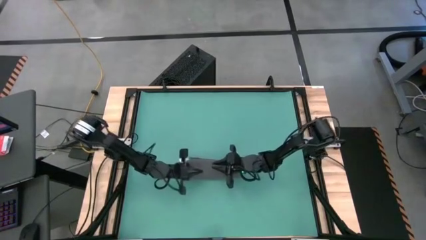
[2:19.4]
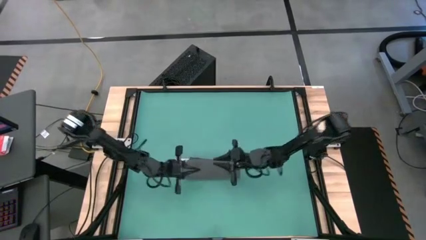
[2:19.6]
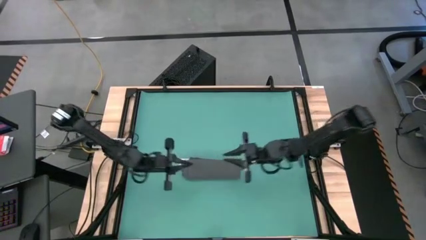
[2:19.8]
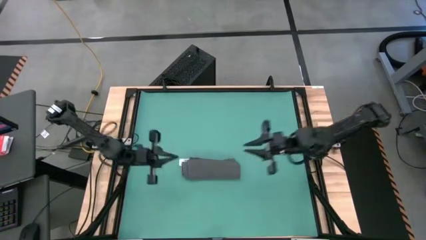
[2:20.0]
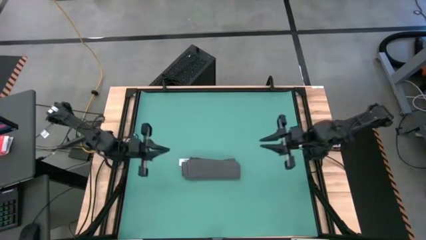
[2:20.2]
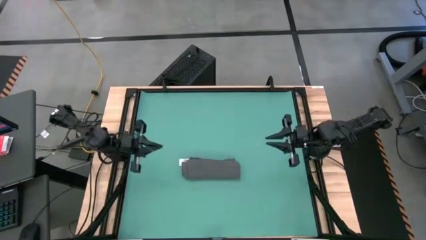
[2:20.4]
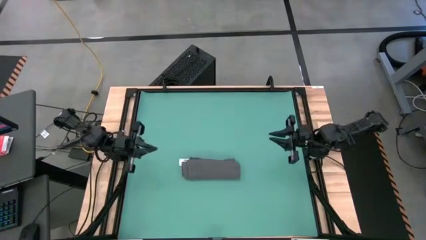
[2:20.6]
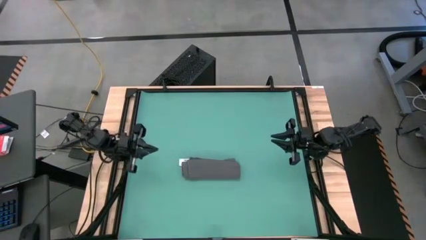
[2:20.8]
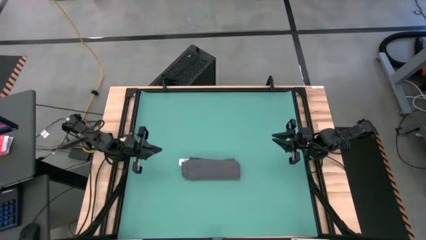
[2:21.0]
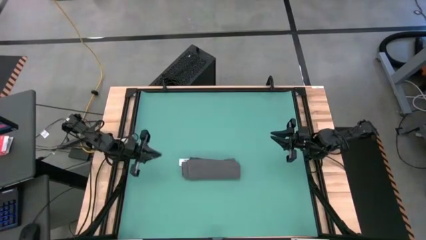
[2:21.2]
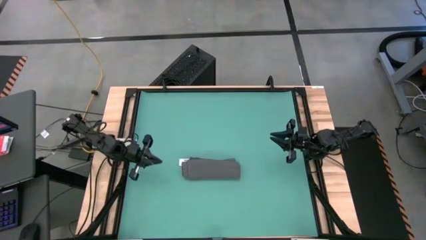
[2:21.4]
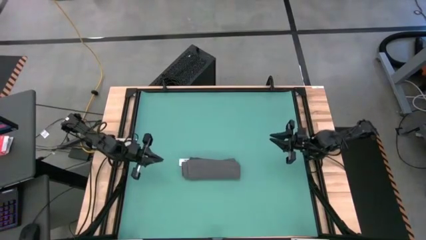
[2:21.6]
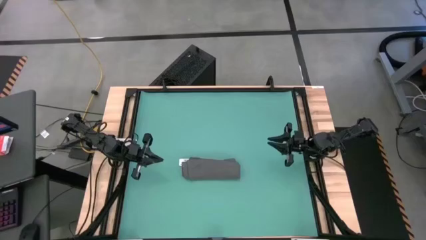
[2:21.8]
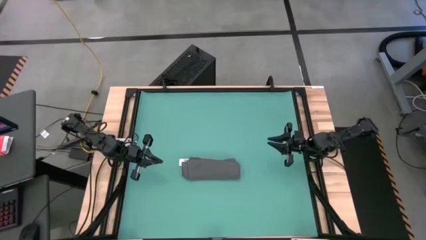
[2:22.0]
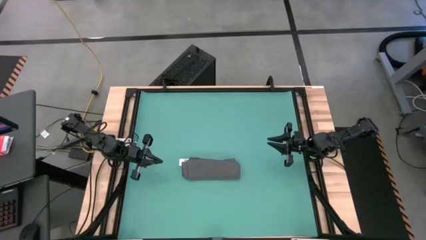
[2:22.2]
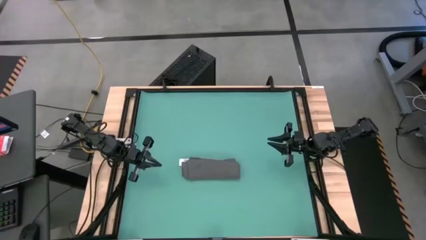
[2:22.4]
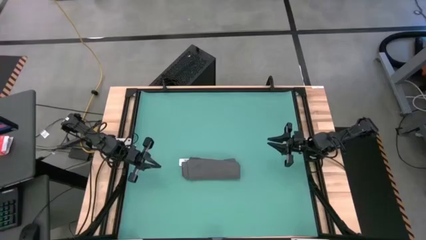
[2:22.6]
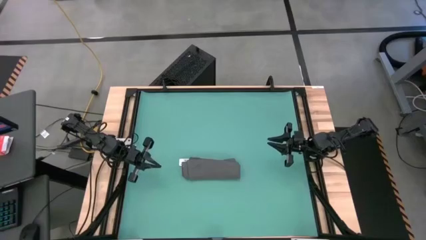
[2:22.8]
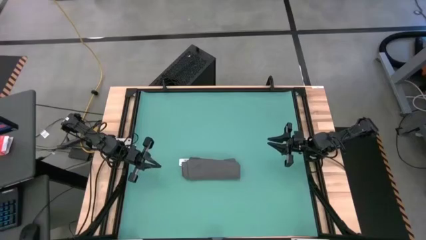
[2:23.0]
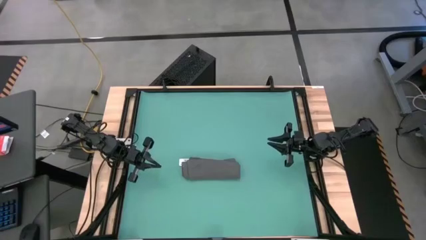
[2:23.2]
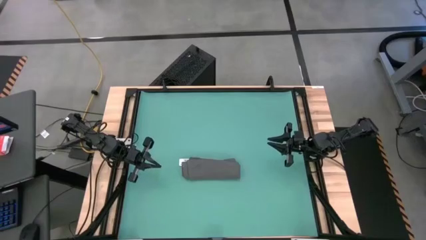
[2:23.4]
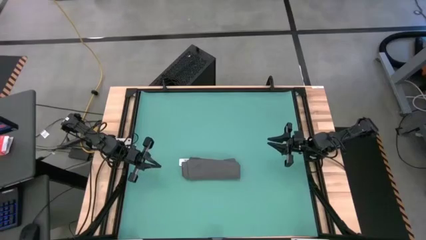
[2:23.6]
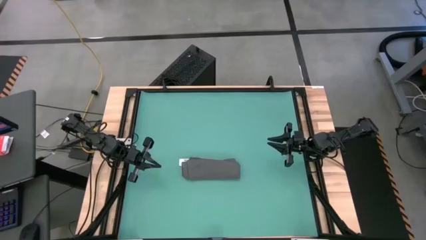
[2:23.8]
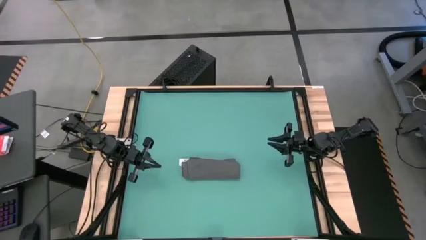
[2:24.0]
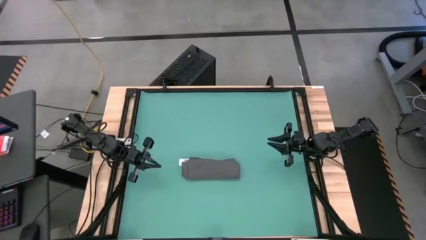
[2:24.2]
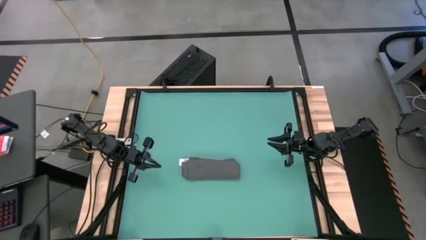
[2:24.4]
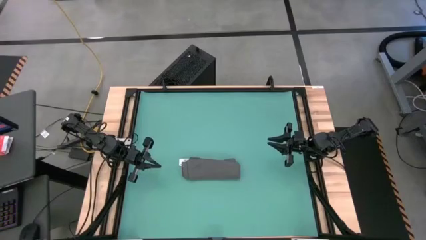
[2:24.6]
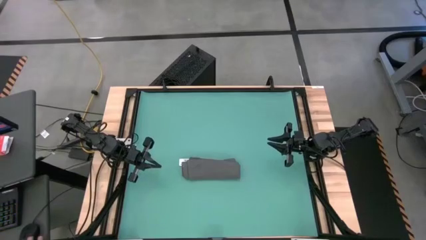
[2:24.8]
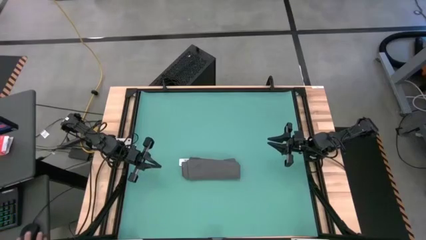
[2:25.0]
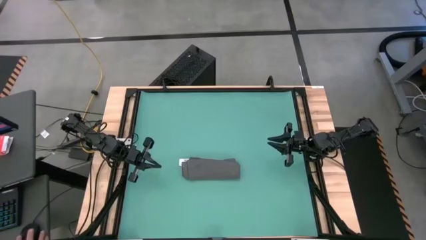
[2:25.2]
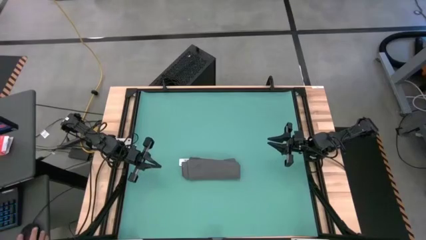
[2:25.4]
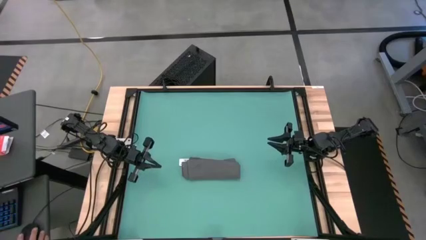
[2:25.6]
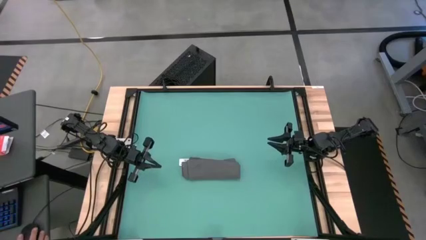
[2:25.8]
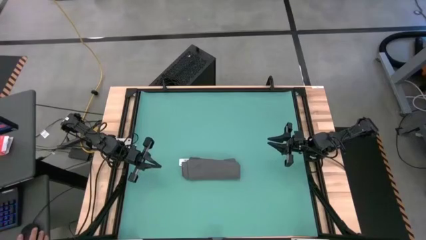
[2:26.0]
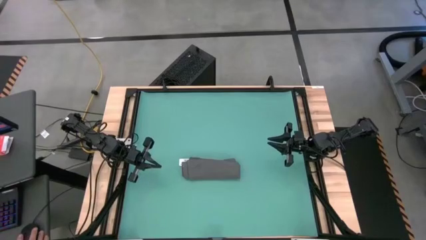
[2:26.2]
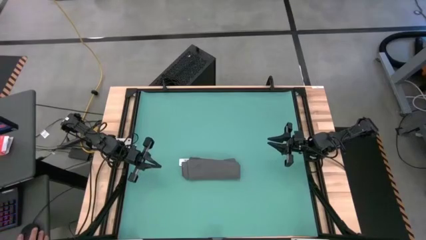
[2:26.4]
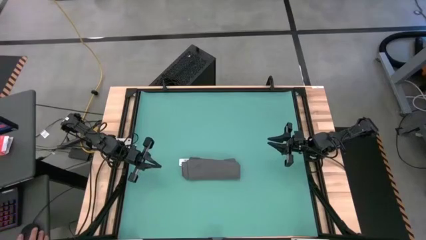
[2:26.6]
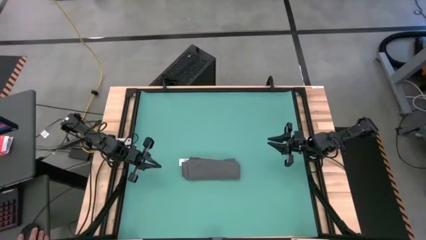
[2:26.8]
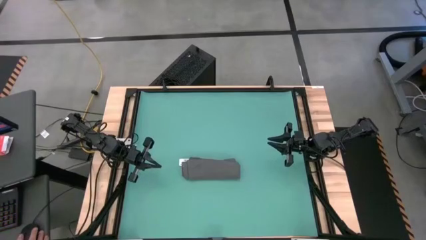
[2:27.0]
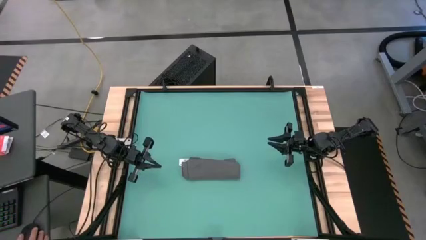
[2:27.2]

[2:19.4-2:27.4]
Task: Roll towel
Return to Home Position

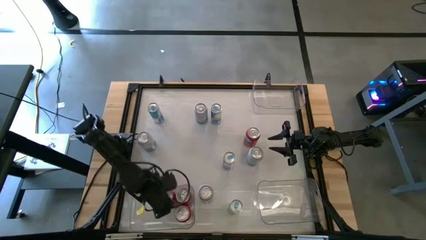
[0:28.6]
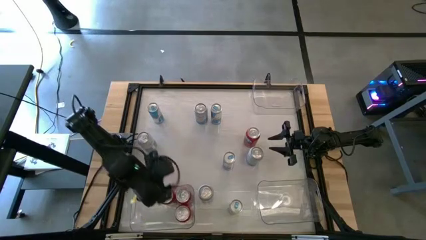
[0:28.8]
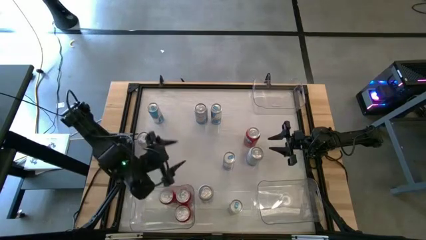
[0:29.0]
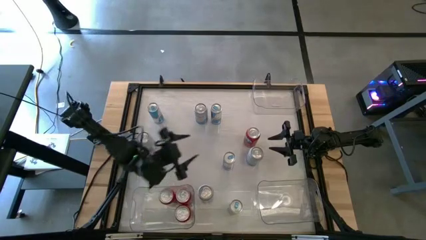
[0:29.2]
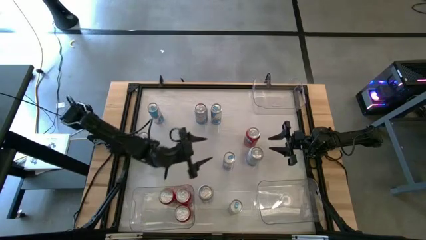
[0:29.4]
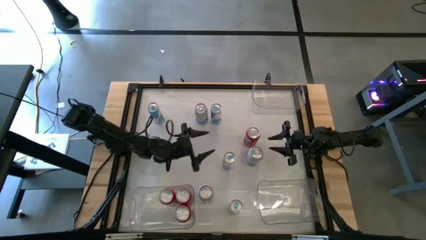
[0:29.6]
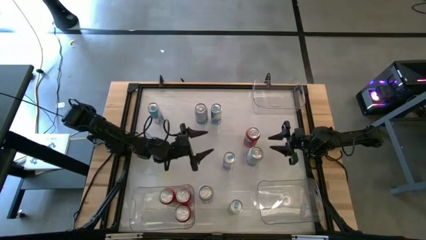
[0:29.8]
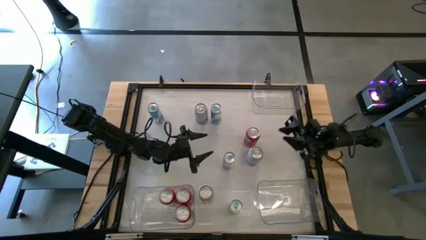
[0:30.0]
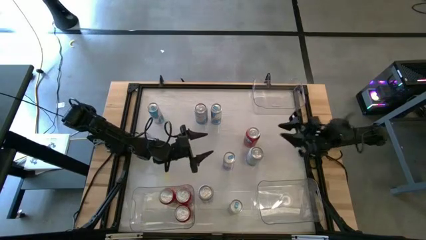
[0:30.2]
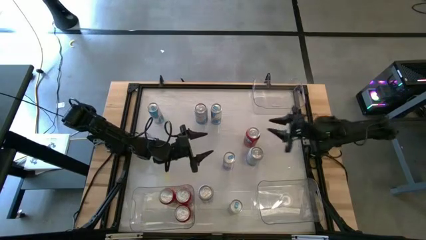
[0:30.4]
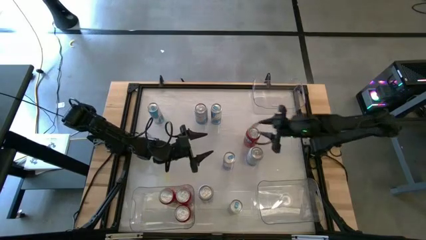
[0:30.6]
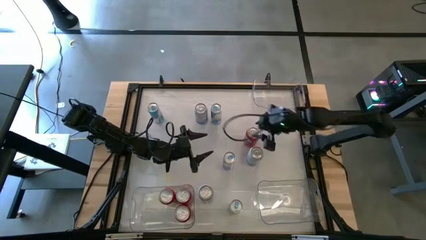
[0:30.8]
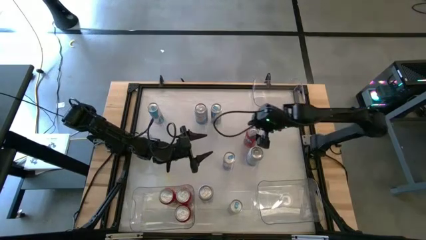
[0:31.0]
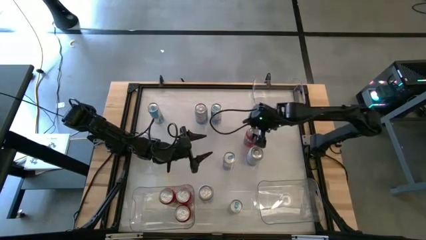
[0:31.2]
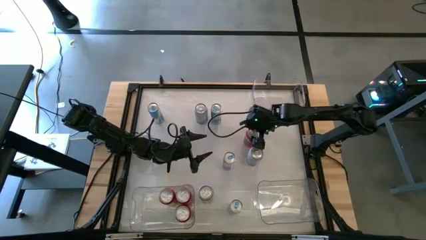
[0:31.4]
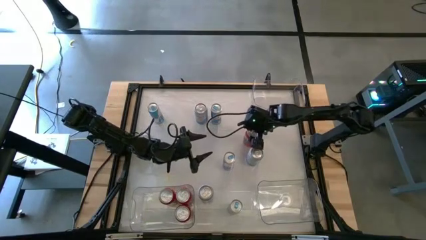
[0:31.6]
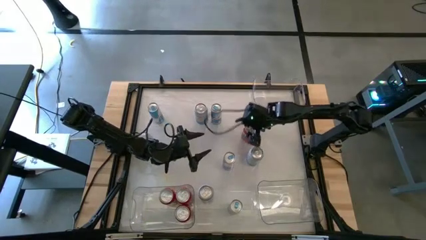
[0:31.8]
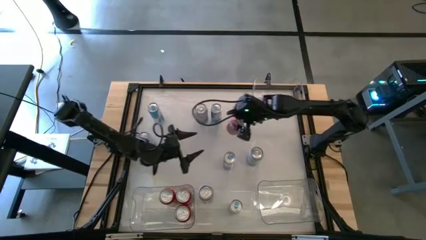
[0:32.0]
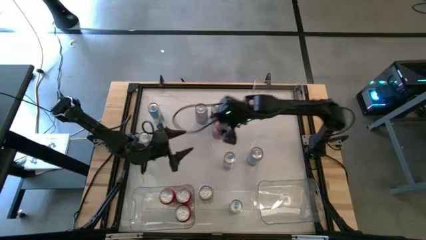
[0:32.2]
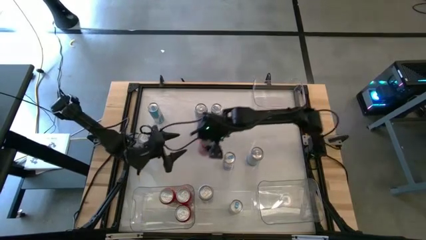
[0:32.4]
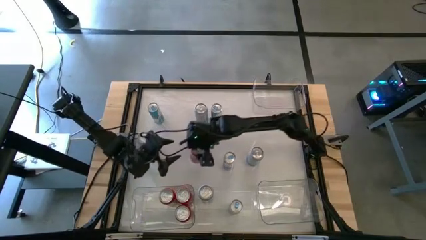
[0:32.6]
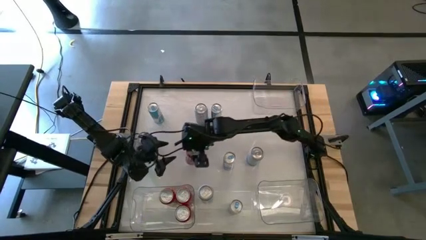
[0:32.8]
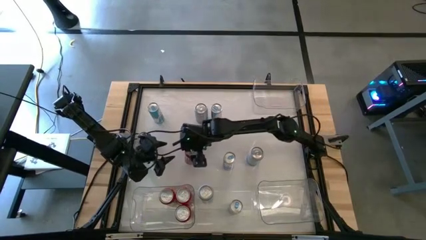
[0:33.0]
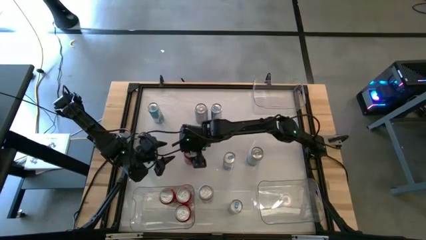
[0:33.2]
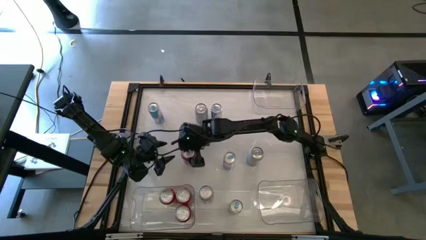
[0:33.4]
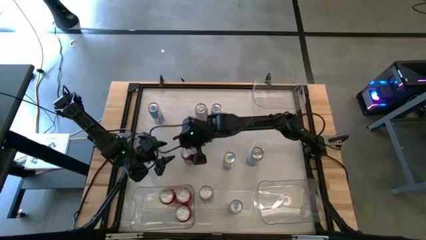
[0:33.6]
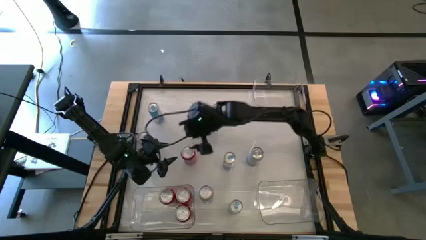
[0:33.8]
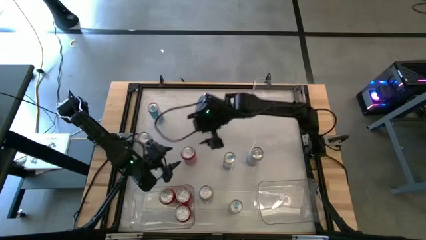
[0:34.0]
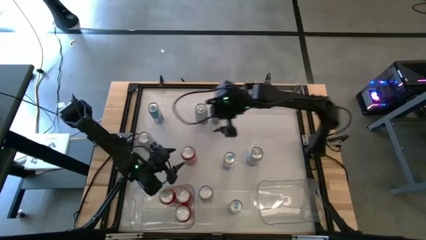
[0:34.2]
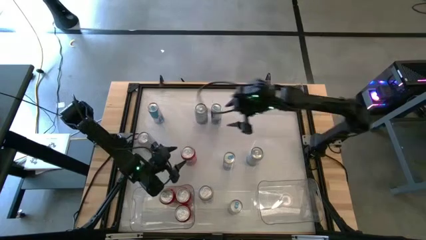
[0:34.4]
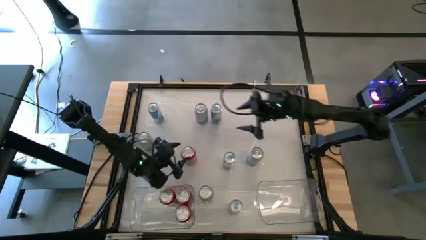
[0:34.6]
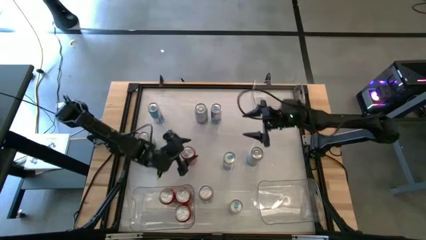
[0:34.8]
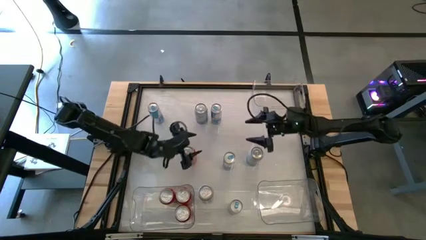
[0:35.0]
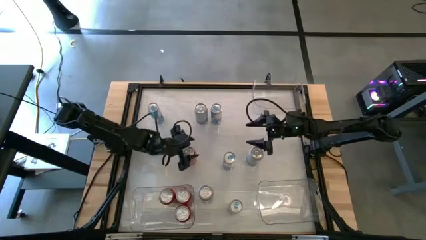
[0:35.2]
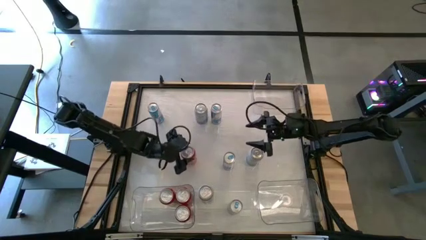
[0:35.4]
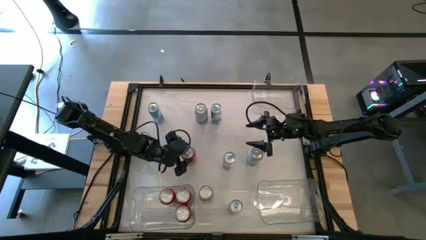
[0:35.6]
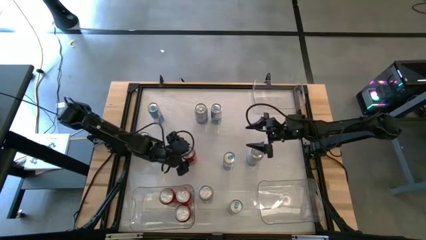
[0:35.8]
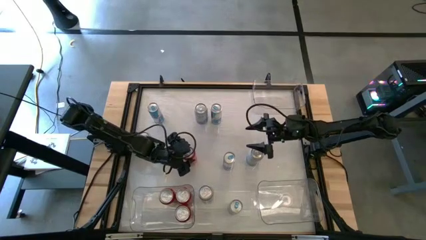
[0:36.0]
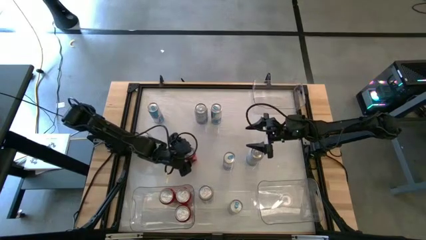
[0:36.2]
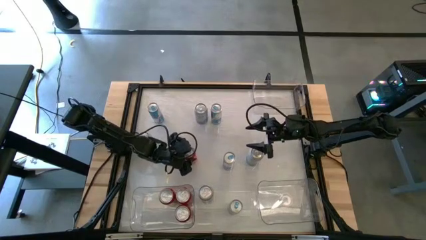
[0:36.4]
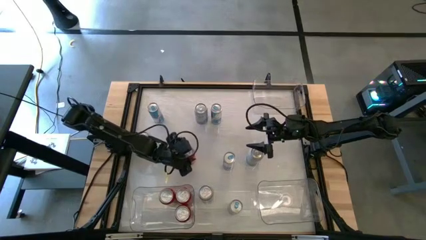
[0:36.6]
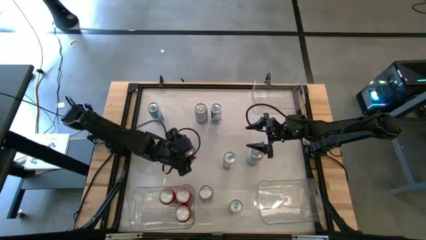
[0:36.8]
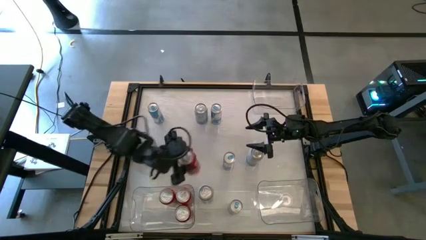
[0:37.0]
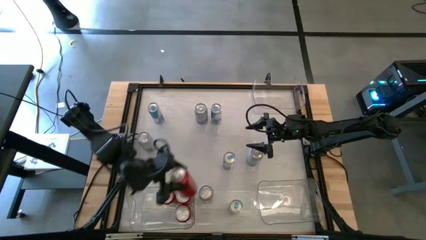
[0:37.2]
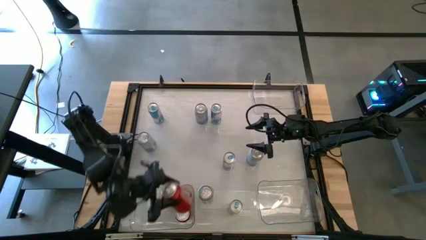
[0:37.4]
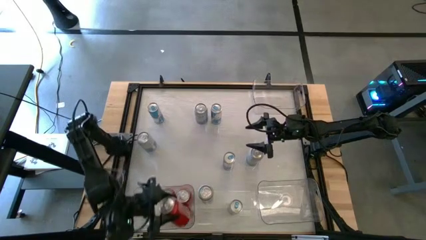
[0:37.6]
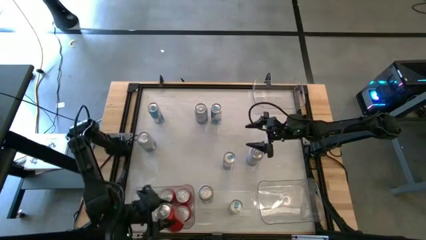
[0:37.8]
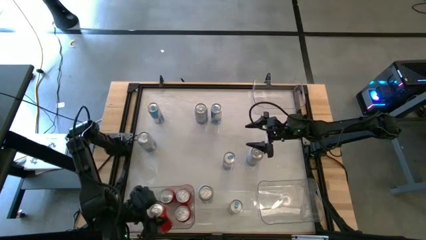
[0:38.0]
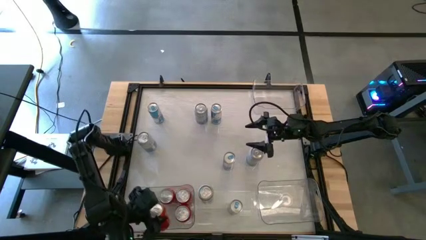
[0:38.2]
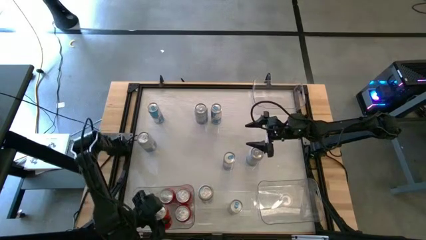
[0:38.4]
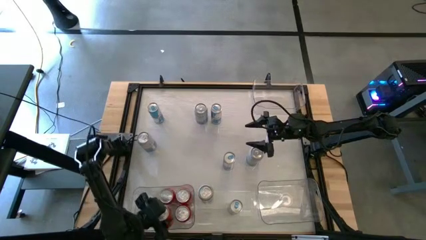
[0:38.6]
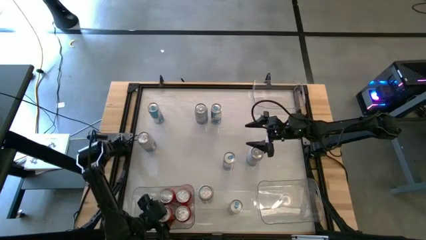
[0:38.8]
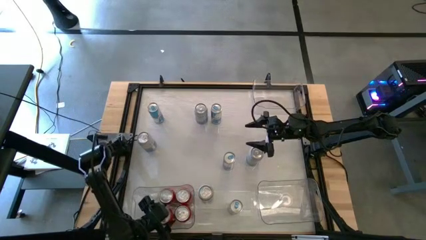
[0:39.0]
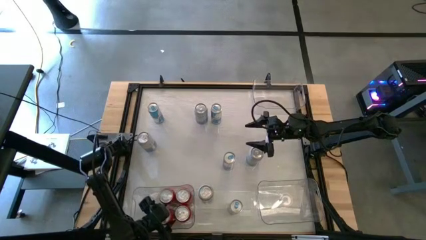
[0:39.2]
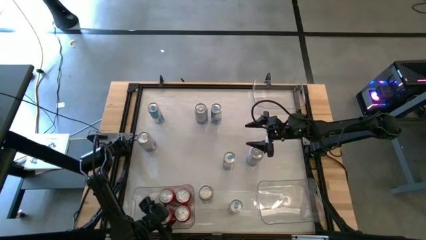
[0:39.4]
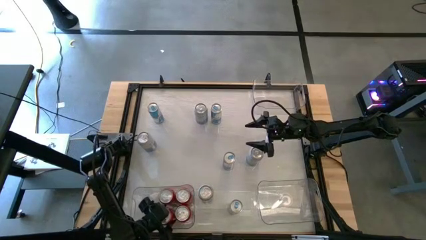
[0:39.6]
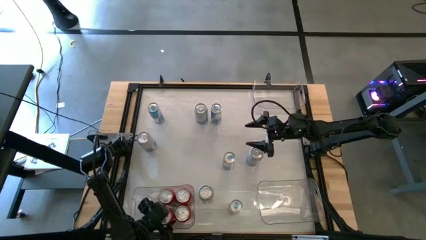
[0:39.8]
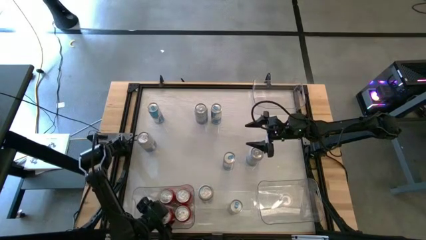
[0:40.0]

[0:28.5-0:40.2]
Task: Sort soda cans
Put the orange soda can into the bottom left transparent bin
